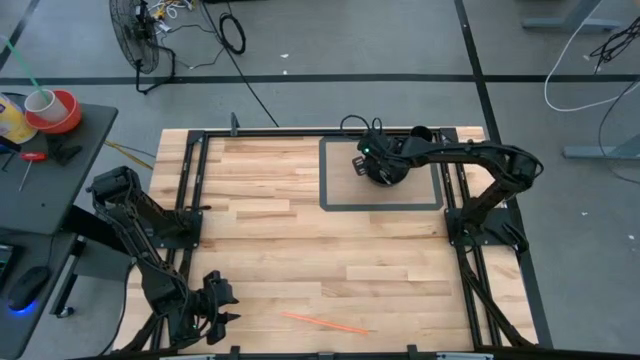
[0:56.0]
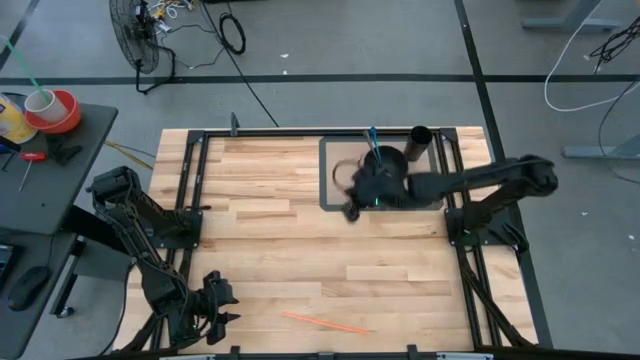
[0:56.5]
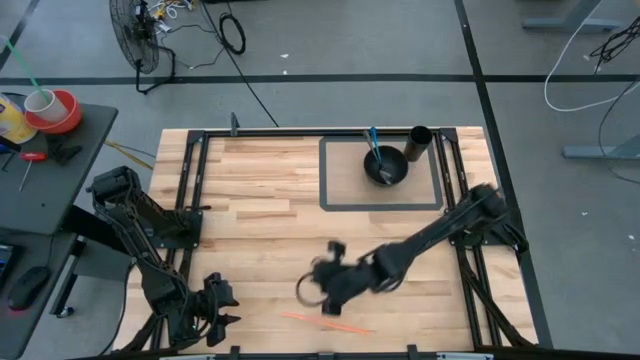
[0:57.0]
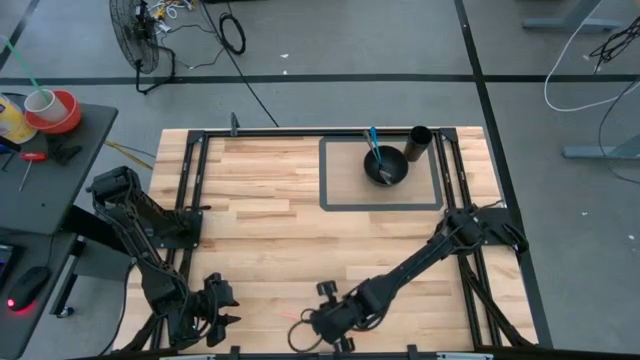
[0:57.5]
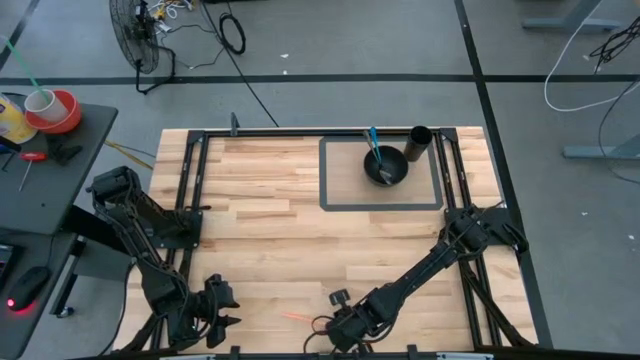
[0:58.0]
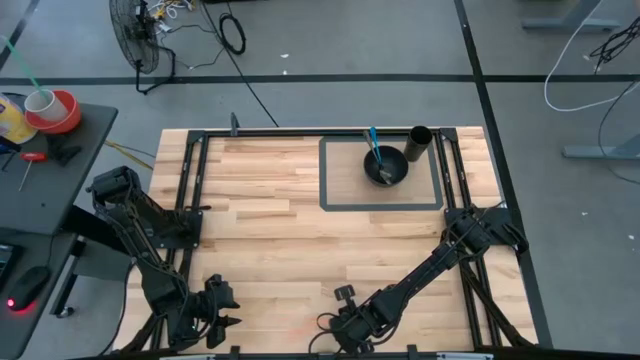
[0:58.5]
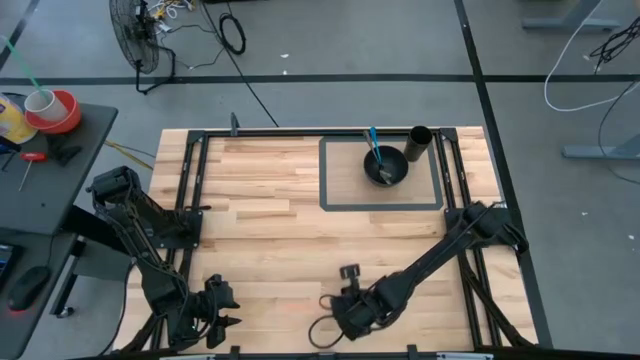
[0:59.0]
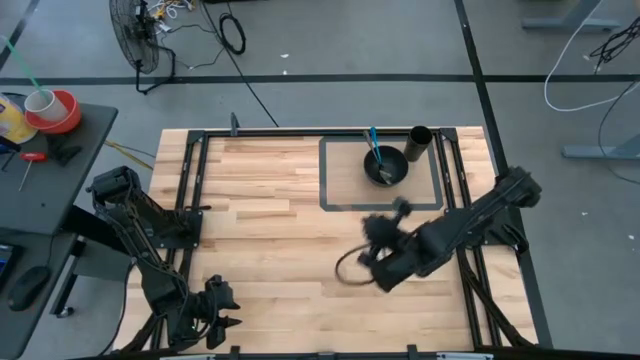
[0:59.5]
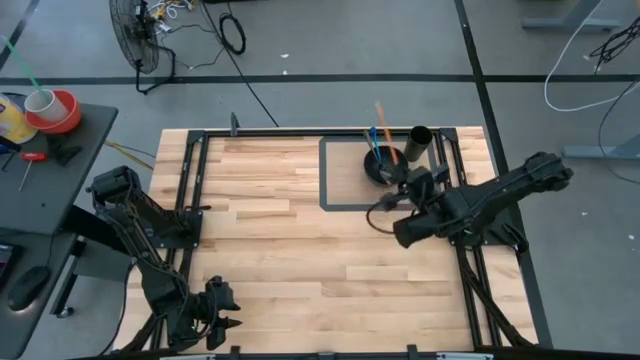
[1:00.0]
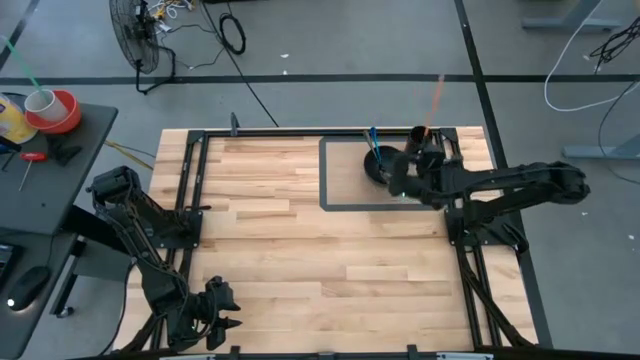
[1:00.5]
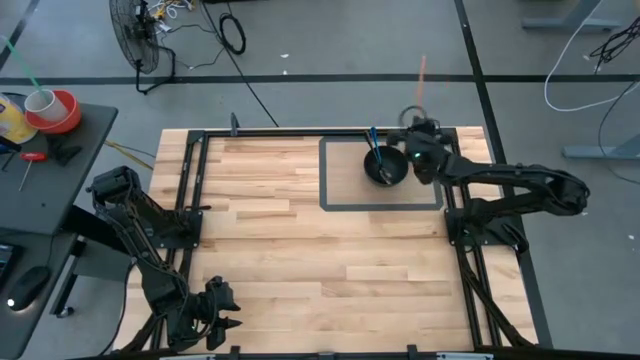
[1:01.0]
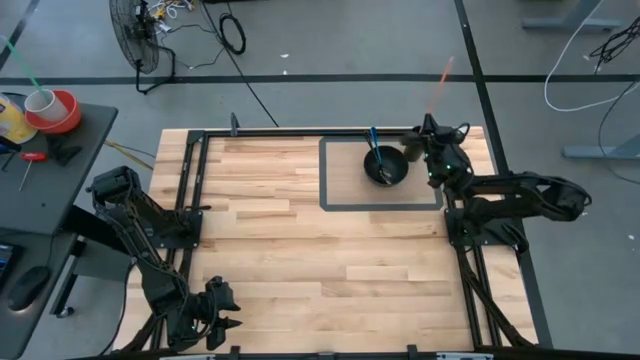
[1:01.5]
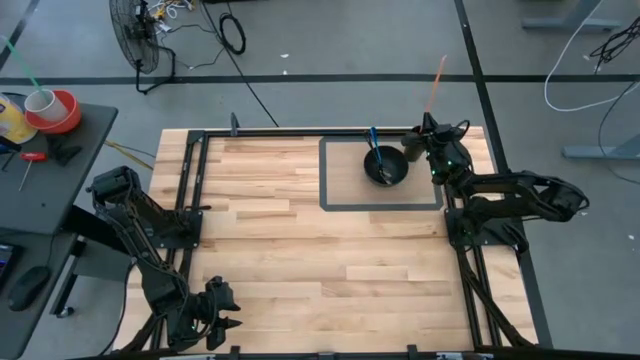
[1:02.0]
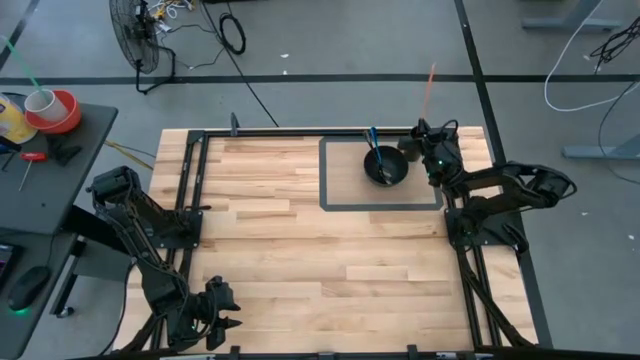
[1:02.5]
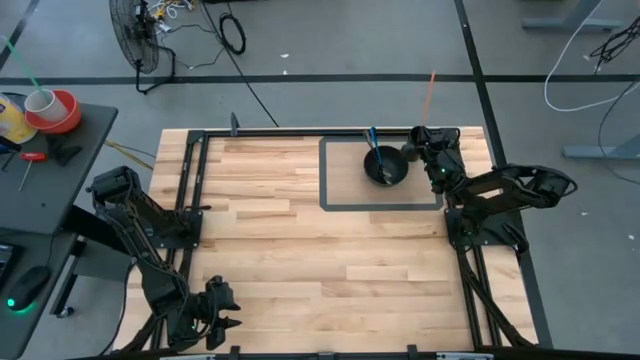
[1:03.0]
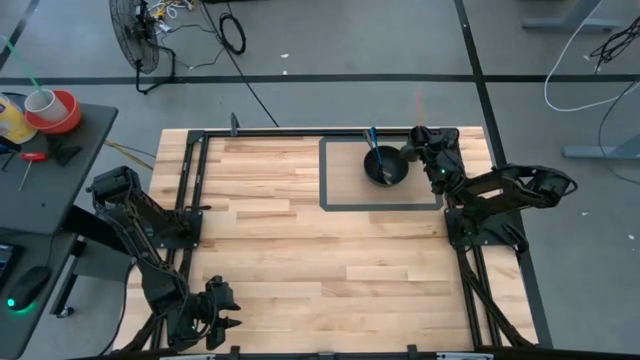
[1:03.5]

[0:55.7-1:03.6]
Task: Pick & Place Utensil
Put the orange straw into the black cup

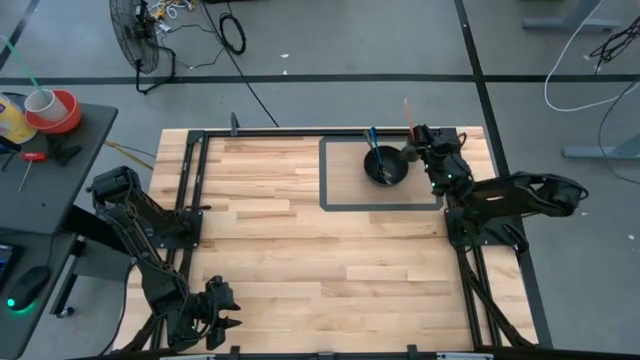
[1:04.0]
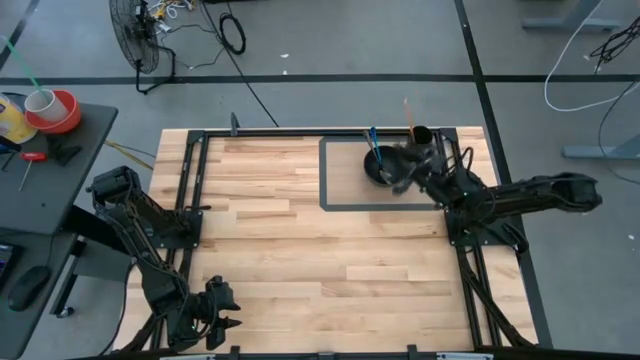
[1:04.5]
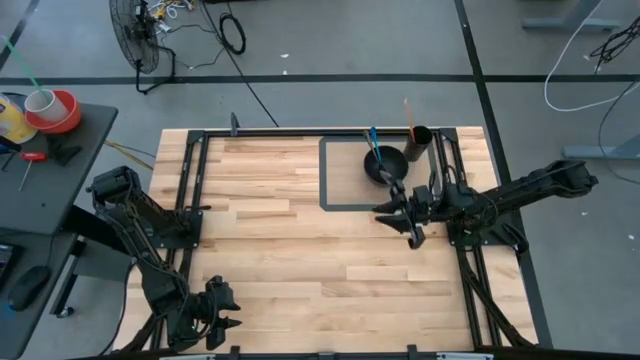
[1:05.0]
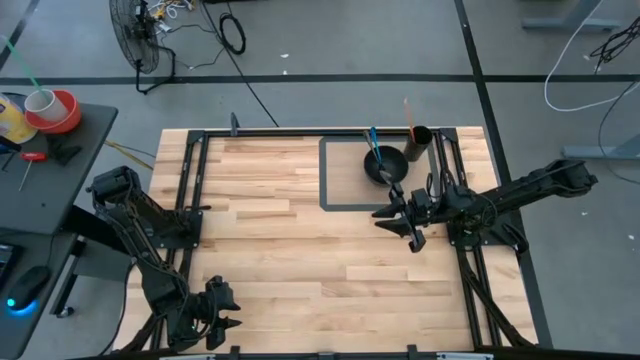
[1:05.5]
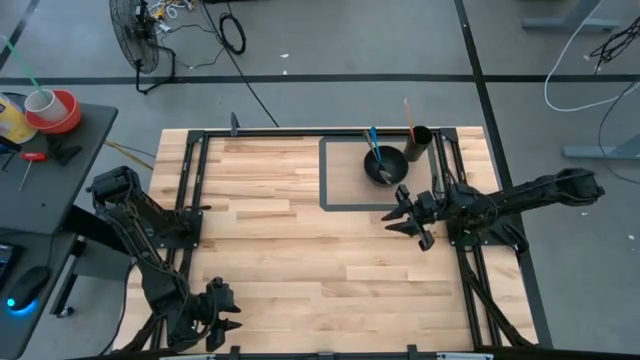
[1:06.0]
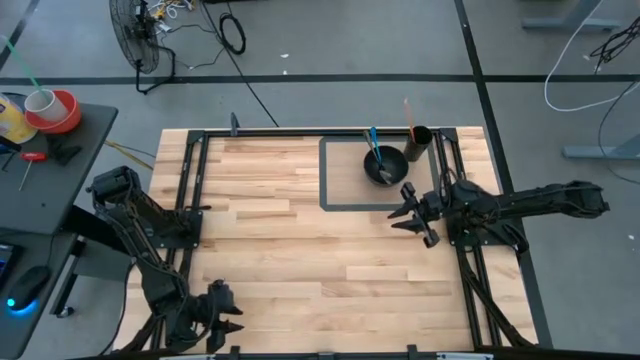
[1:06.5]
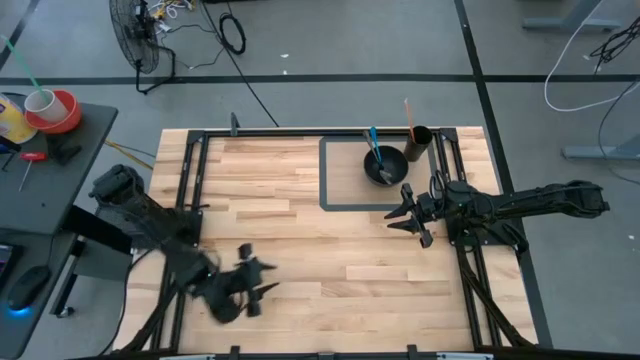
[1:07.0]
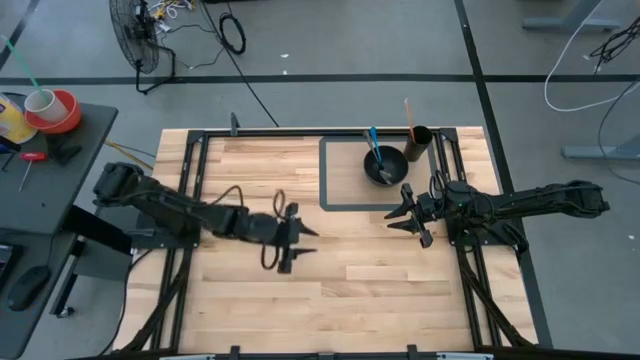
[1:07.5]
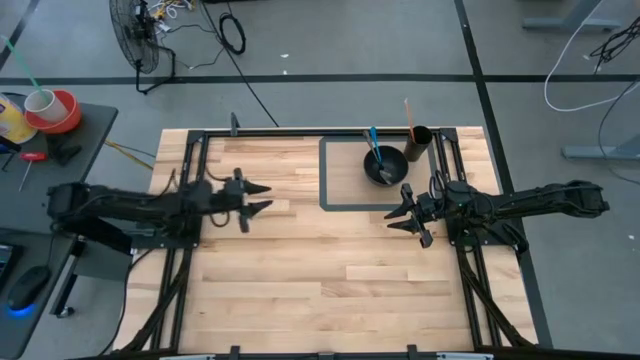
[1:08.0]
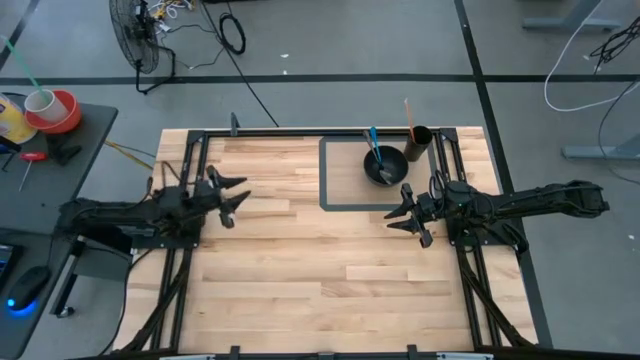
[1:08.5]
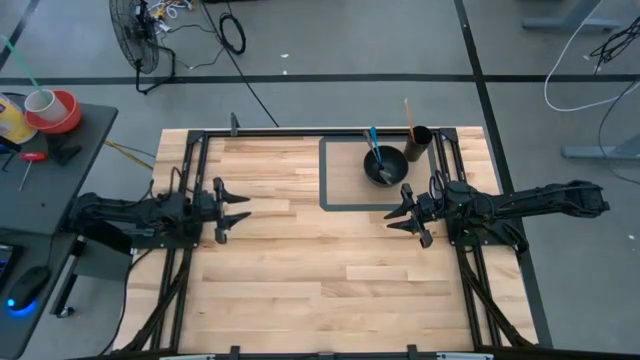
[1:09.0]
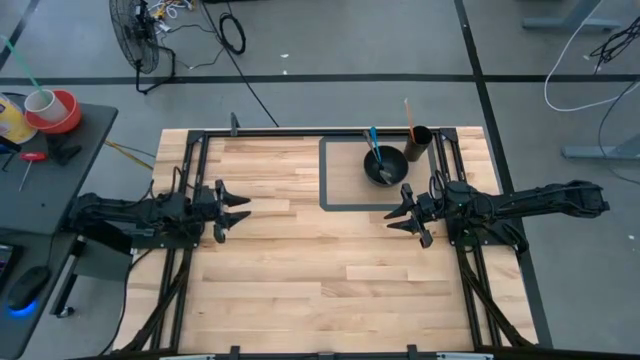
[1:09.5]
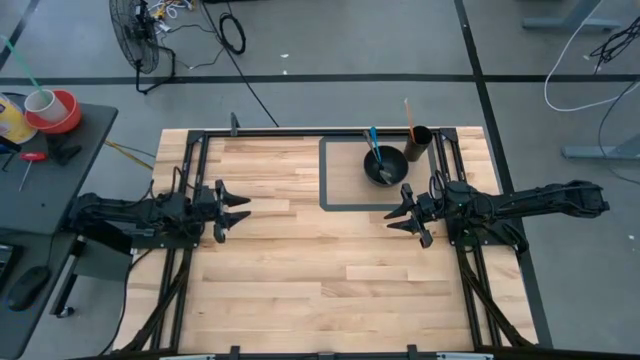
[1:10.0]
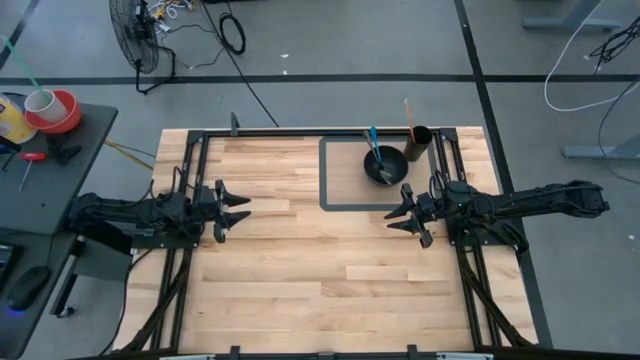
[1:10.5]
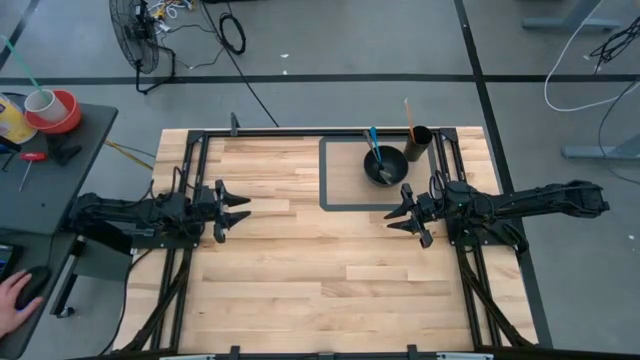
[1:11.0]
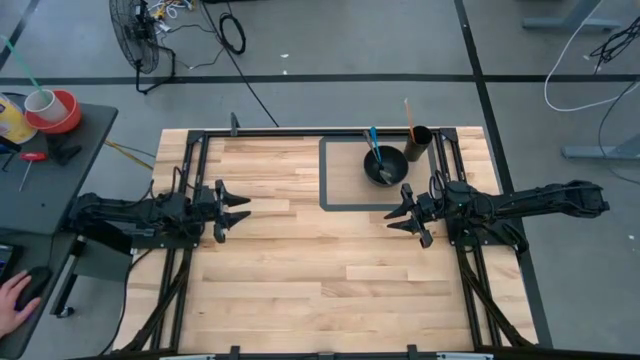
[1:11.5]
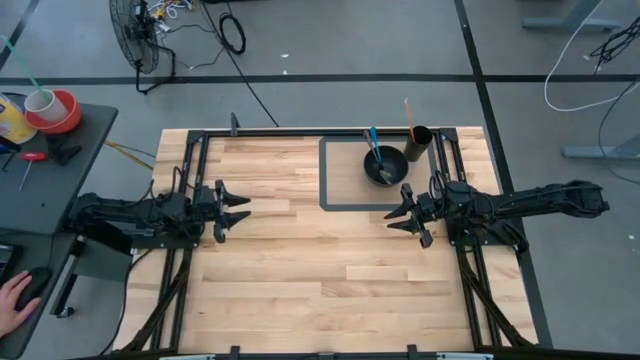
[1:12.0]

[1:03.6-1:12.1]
Return to Home Position

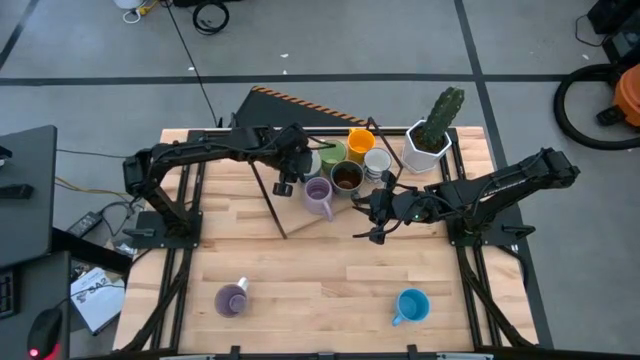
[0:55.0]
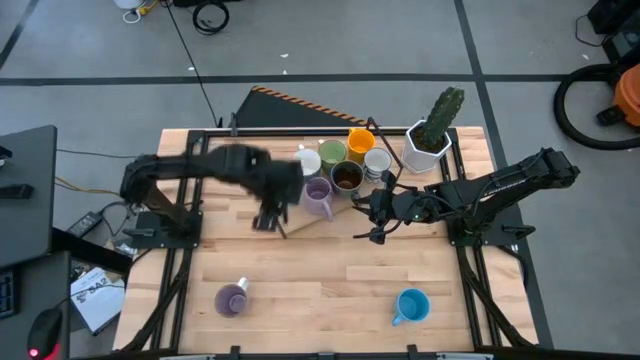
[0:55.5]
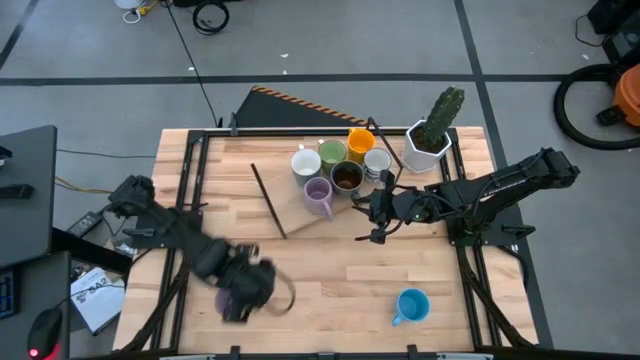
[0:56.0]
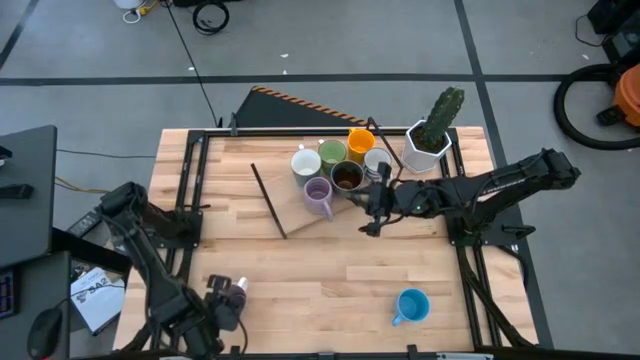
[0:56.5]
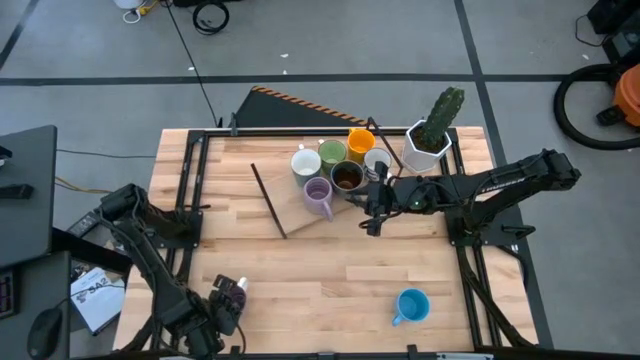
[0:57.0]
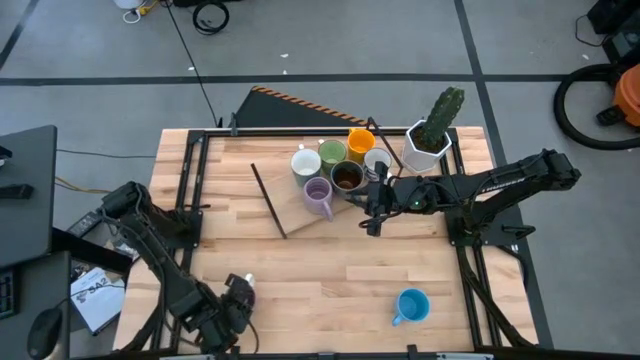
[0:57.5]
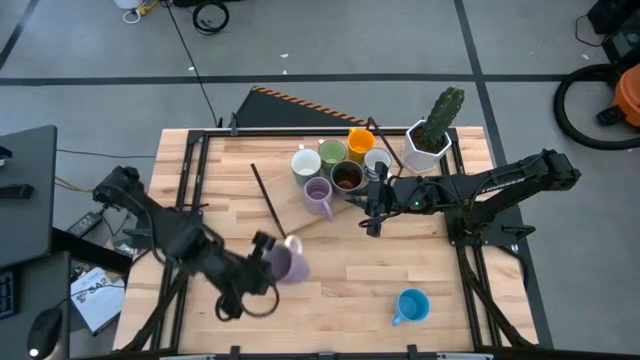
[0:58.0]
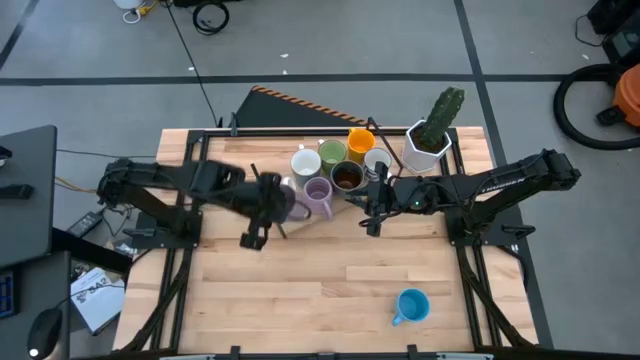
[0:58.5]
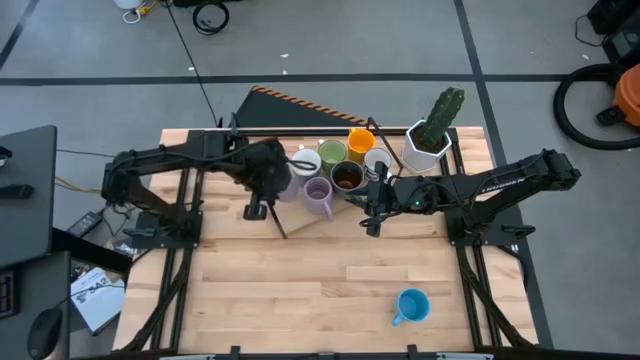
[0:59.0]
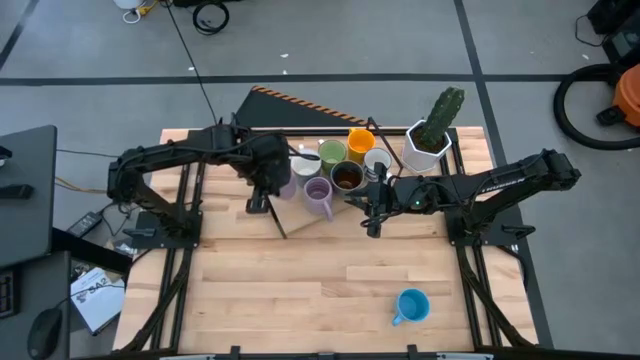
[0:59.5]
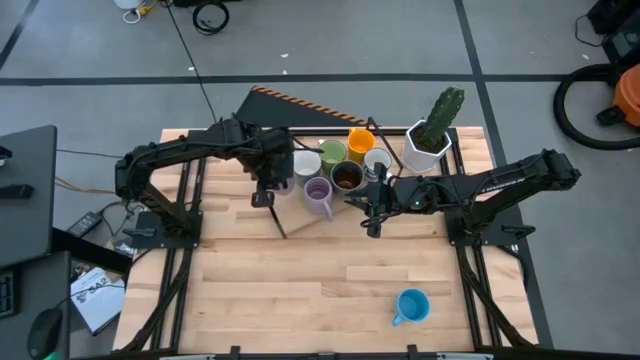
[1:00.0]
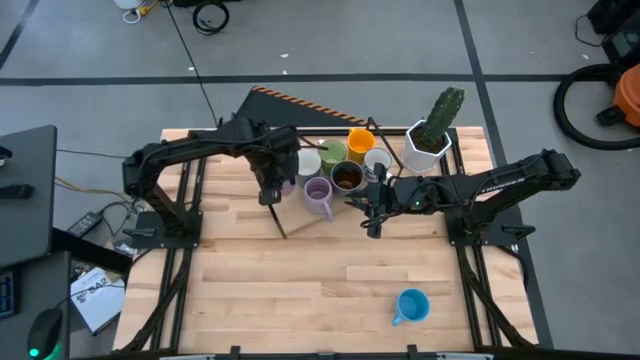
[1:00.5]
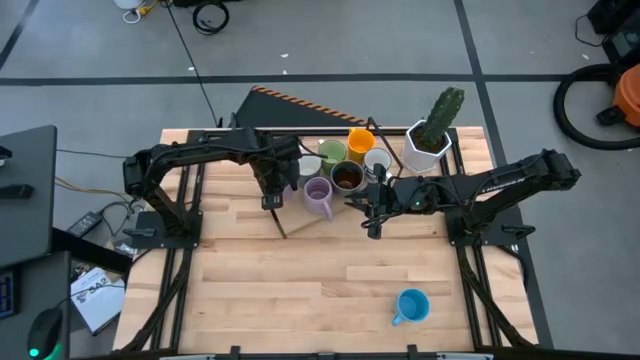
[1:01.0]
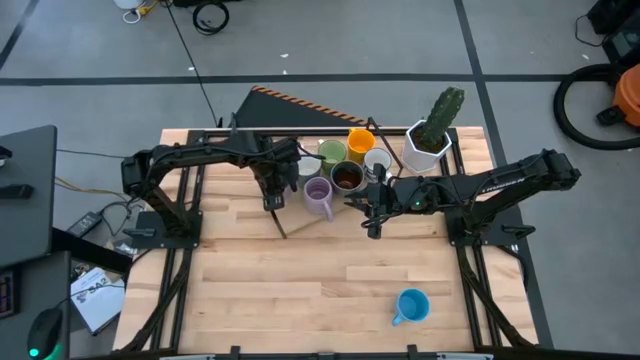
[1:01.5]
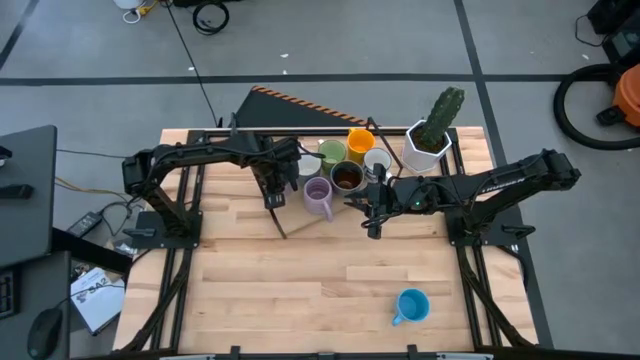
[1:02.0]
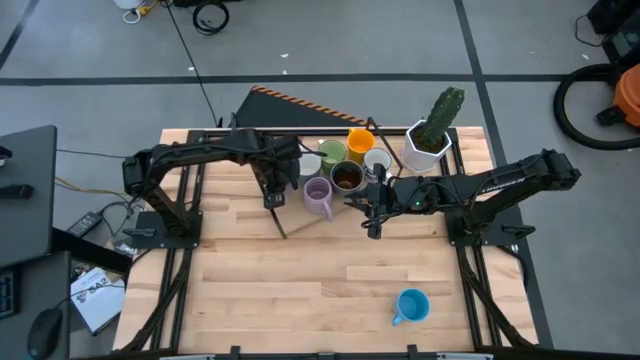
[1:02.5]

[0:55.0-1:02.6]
Task: Place coffee mugs
Put the purple mug on the shelf
